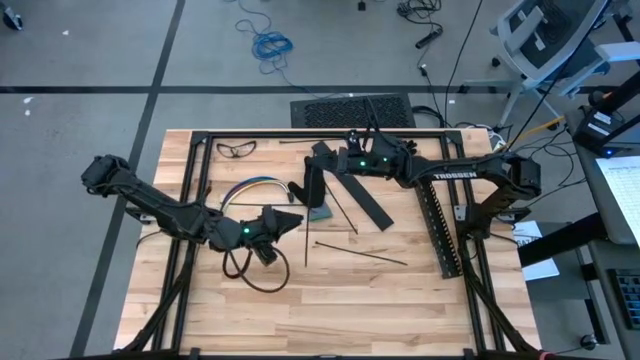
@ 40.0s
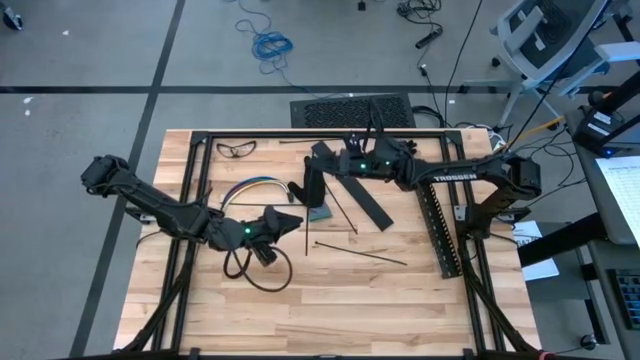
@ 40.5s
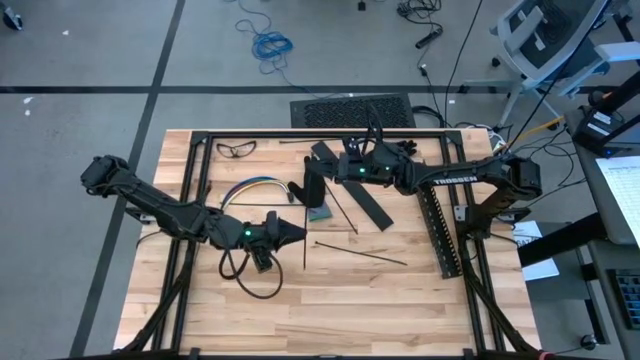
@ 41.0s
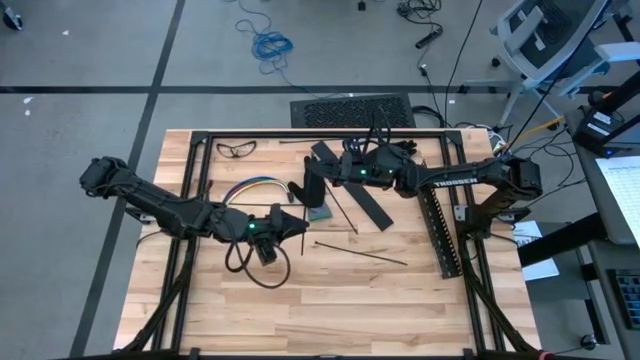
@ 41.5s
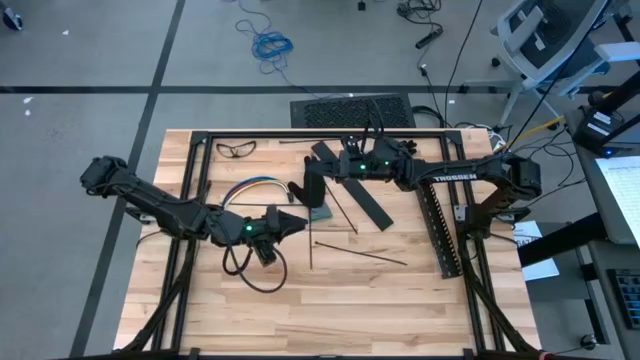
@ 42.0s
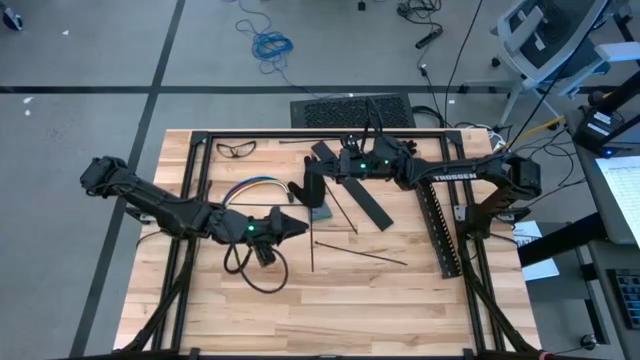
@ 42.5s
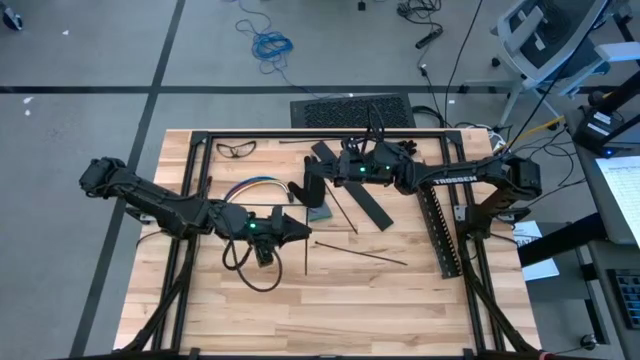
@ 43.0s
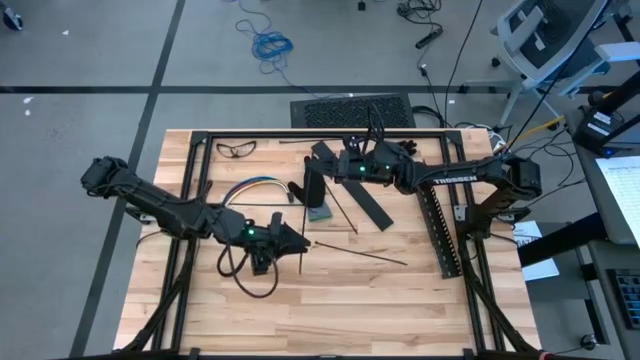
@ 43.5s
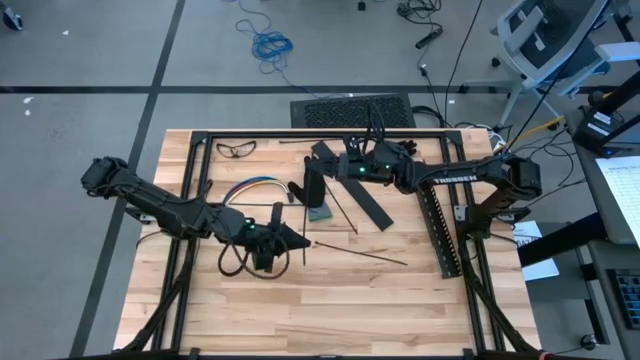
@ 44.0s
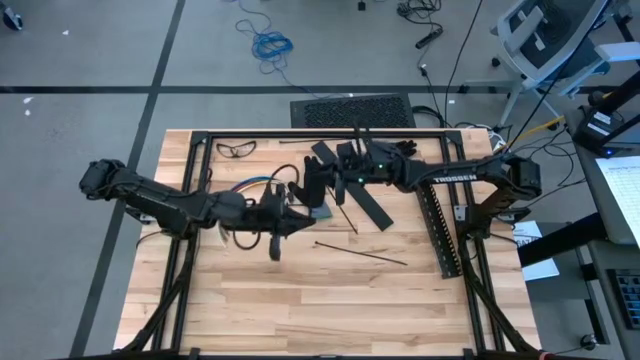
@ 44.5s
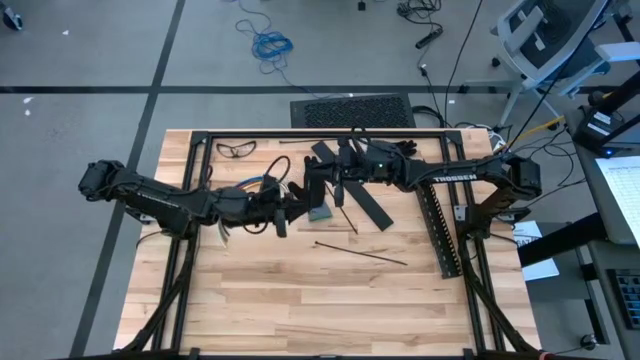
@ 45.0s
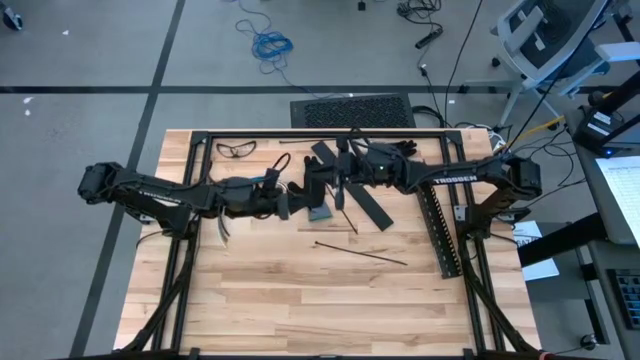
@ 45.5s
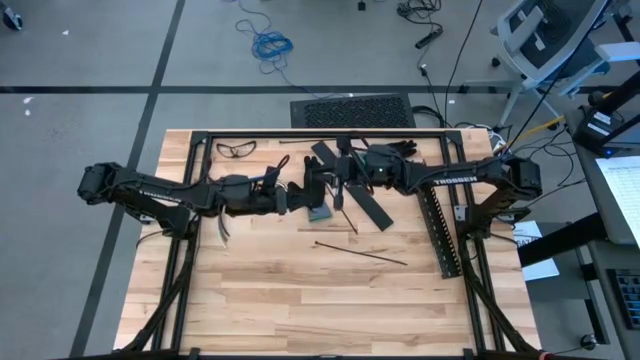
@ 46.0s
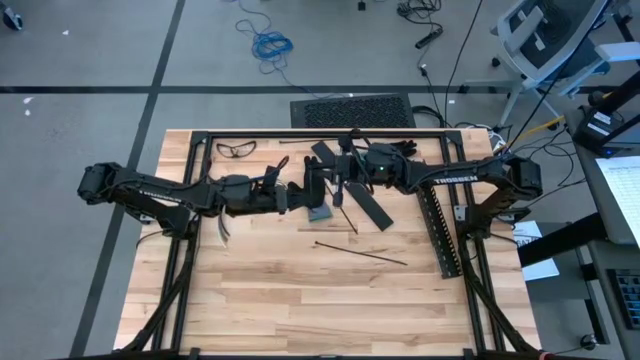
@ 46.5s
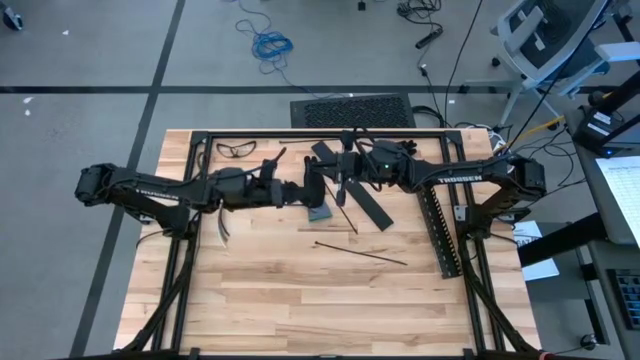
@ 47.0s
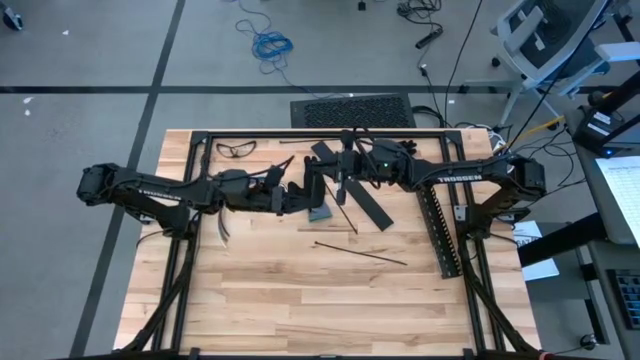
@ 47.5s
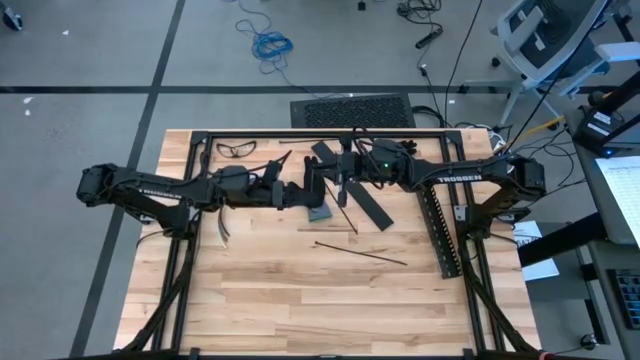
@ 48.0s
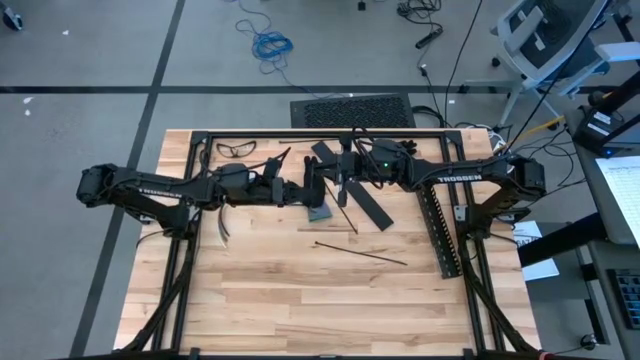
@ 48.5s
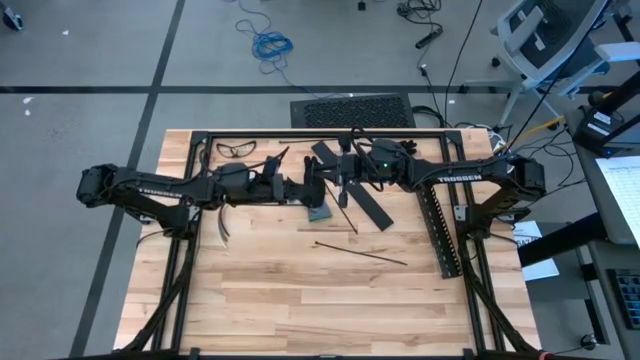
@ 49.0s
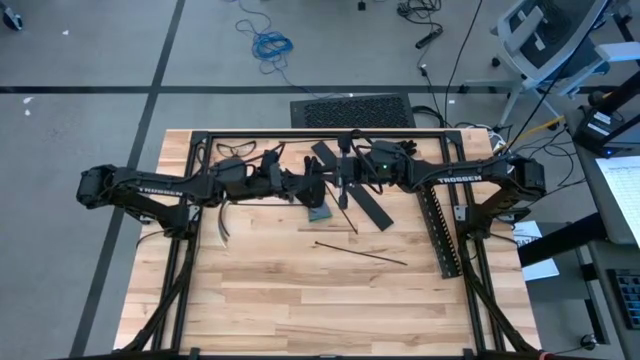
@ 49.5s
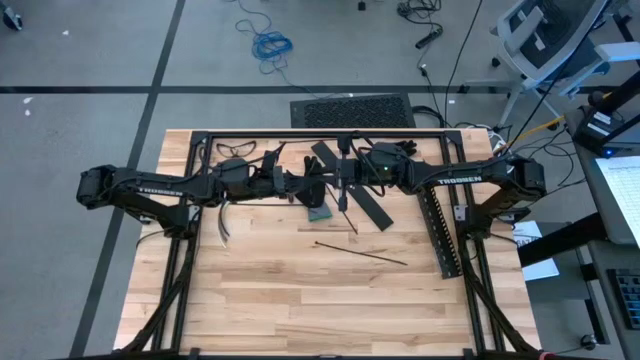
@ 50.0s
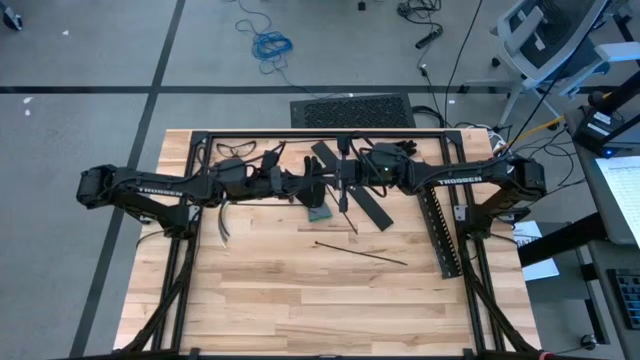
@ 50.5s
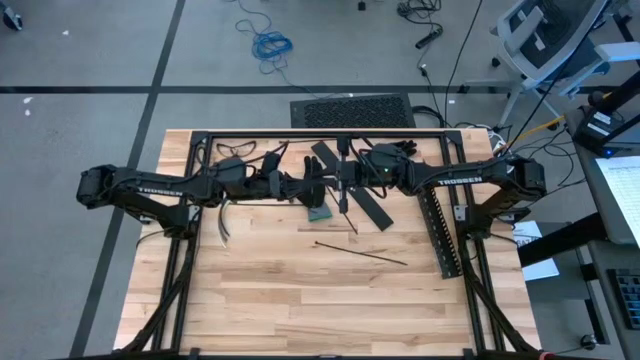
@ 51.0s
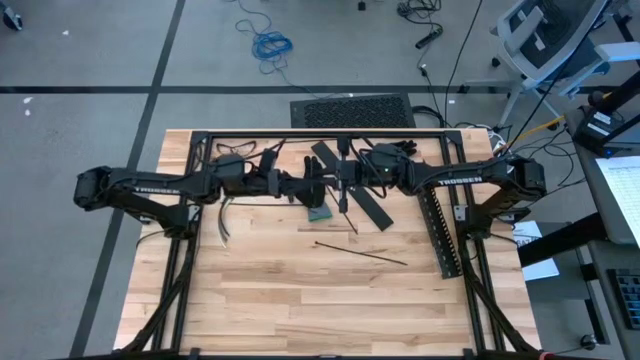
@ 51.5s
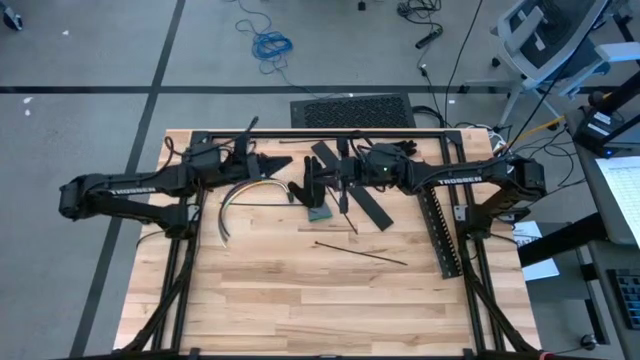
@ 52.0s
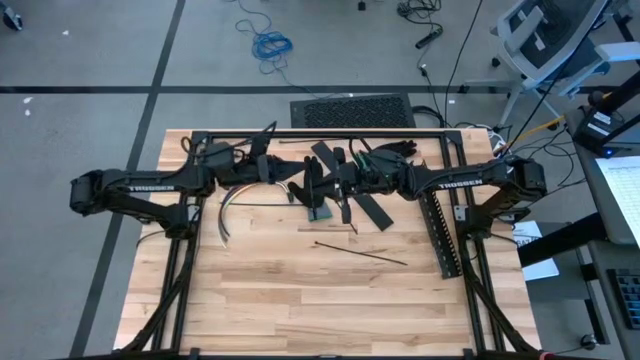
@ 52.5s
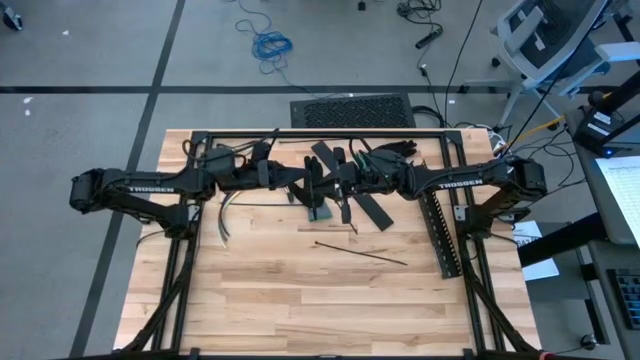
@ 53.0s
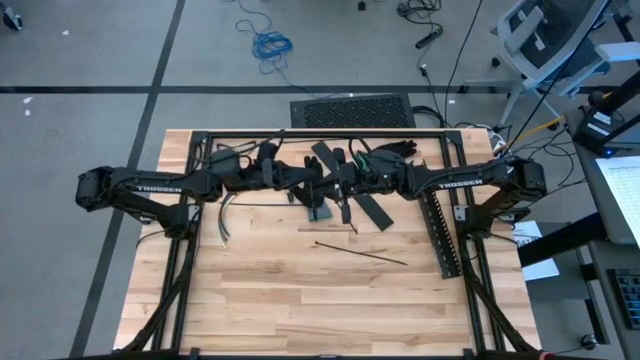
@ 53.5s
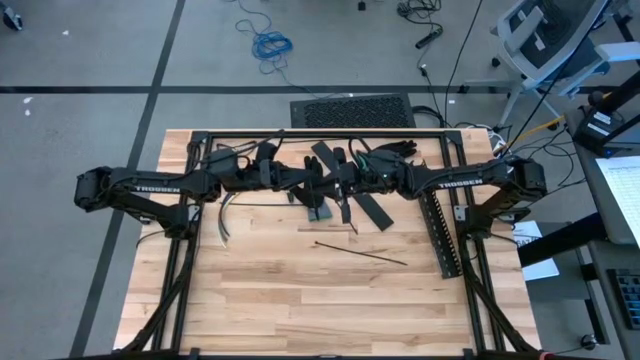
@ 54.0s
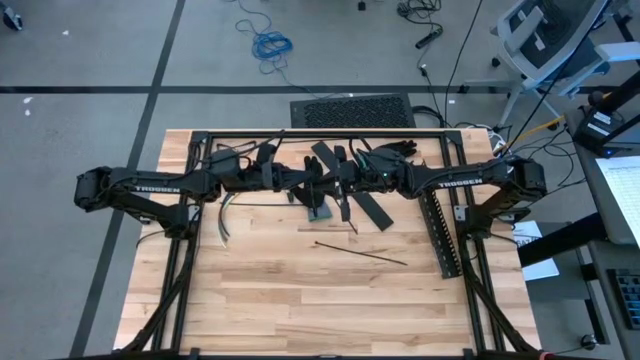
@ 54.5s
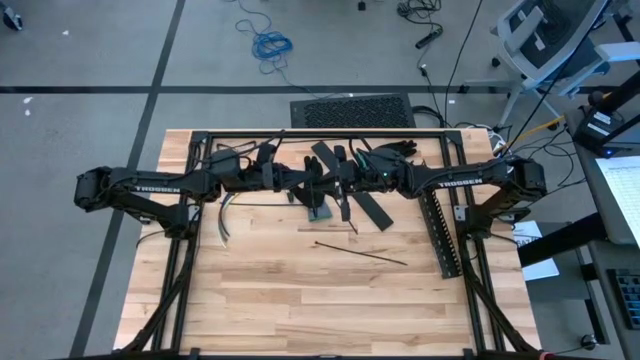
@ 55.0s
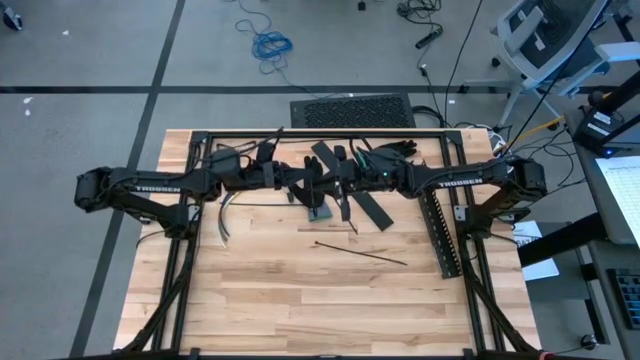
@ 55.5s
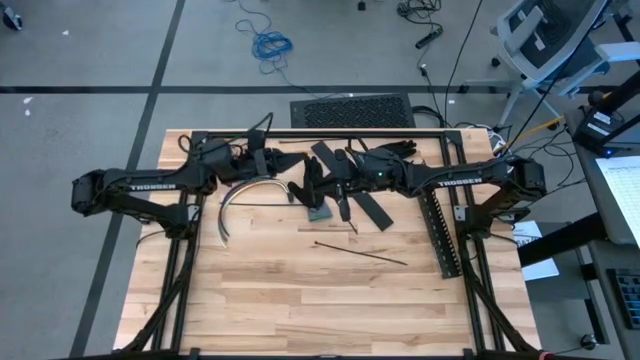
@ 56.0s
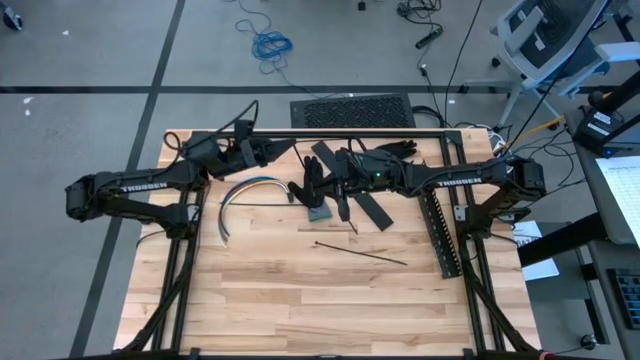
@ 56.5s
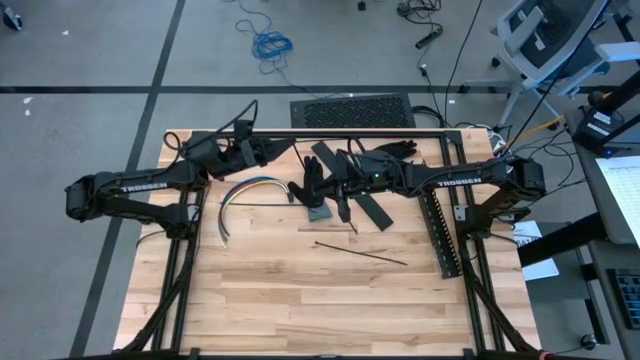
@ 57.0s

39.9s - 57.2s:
Task: Ziptie cables
Wrap the black zip tie on the cable

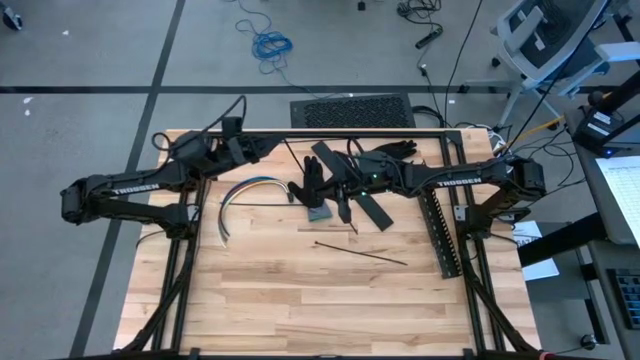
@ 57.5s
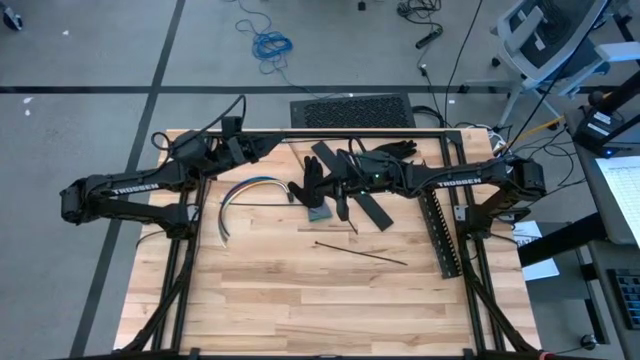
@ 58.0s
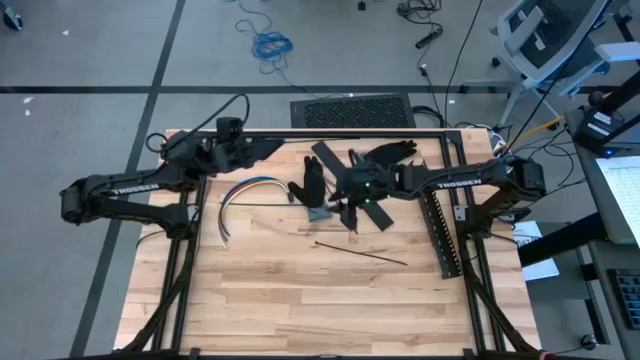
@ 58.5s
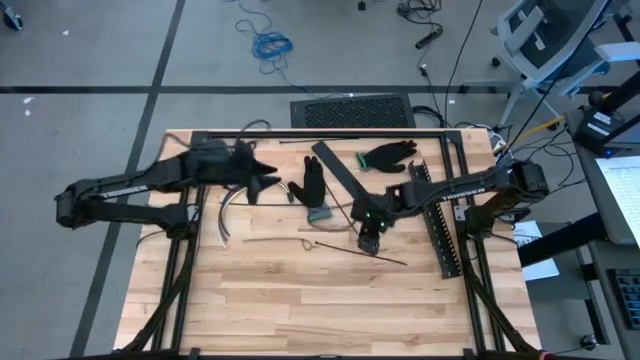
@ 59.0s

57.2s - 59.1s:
Wrap the black zip tie on the cable

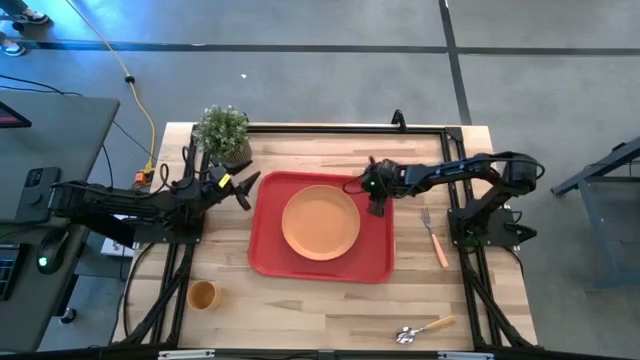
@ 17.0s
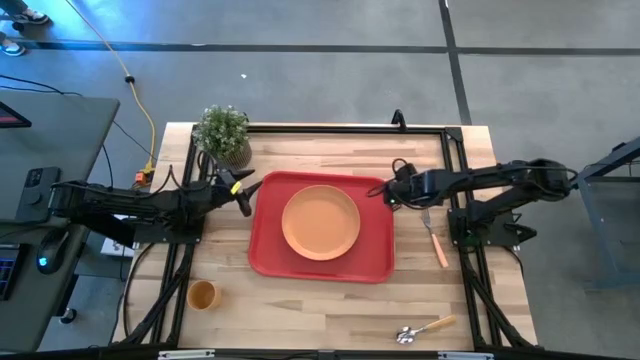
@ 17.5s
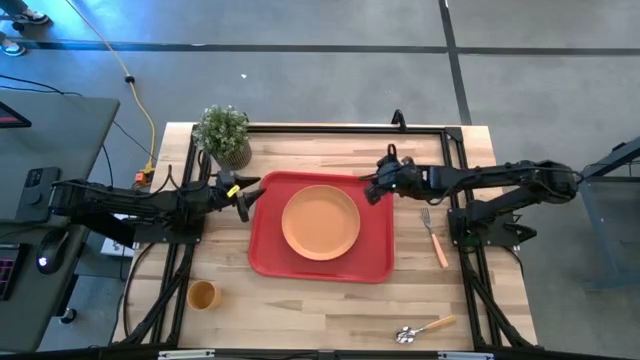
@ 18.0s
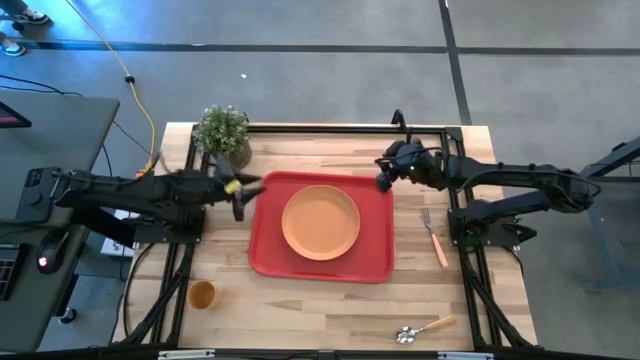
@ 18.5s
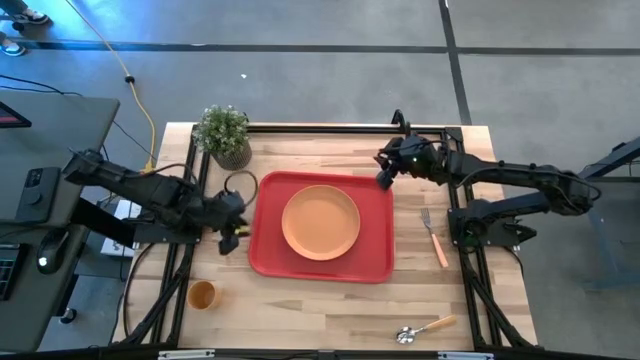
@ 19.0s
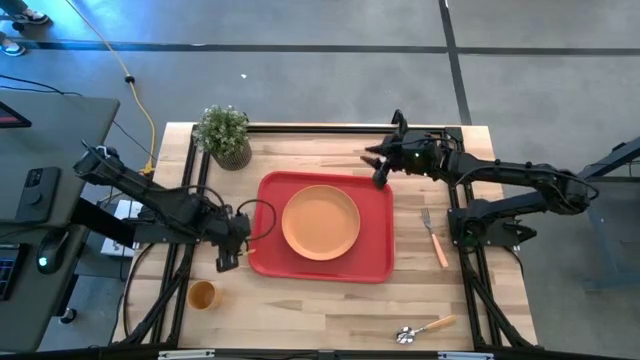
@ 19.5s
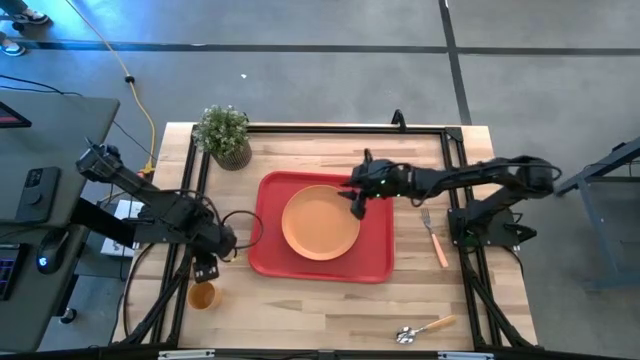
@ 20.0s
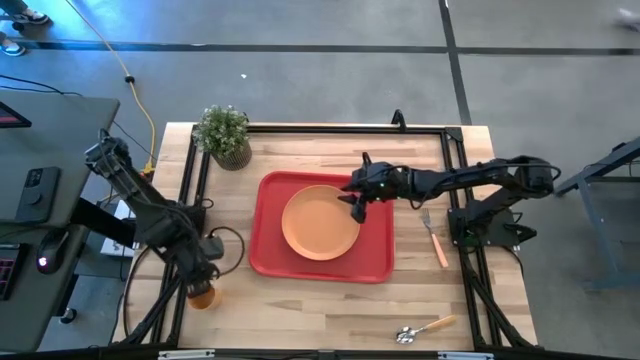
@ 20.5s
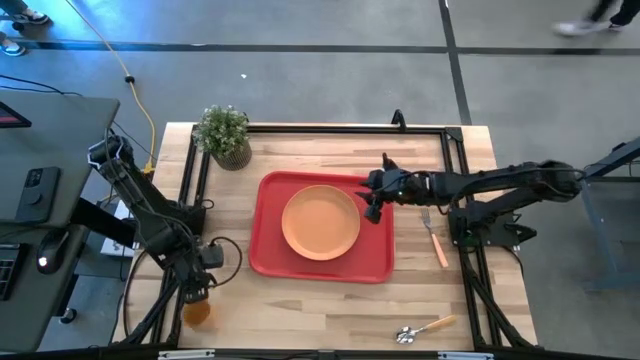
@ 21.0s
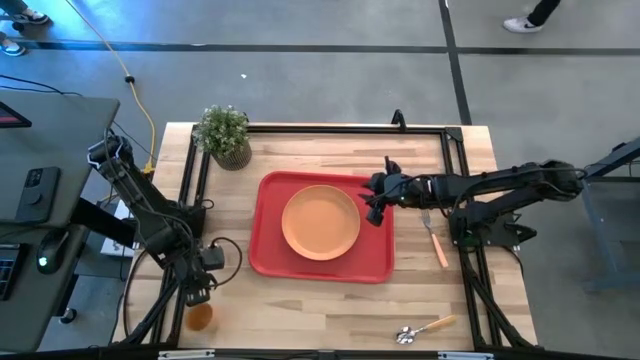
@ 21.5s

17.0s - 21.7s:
Task: Pick and place plate/cup/fork/spoon on tray
Put the orange cup on the red table tray to the top left of the orange plate
